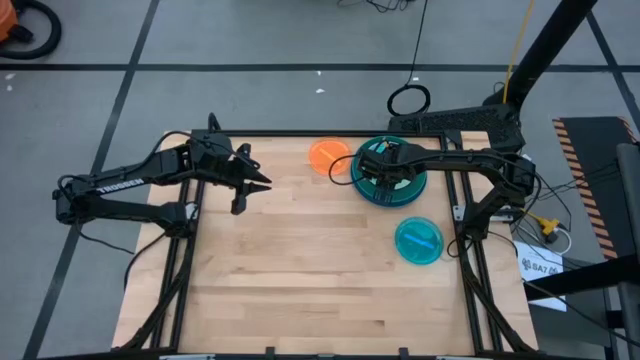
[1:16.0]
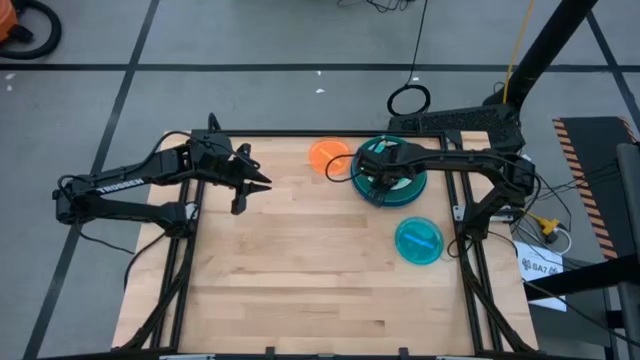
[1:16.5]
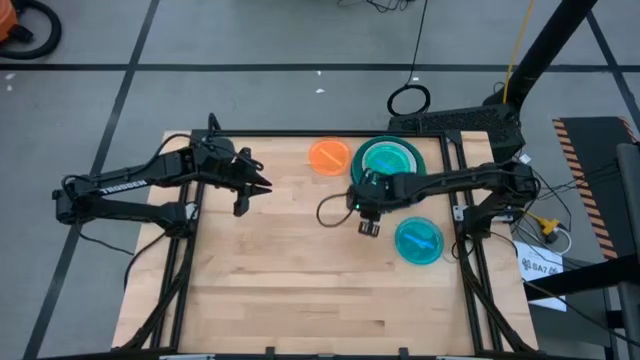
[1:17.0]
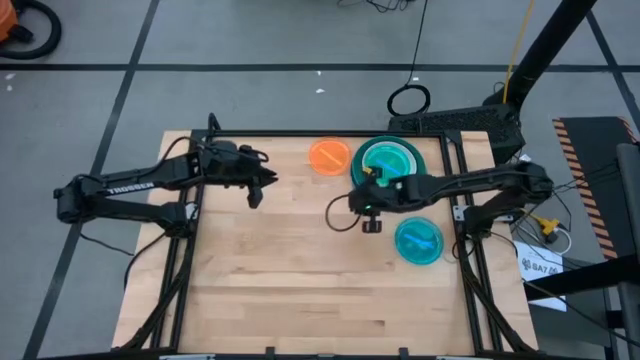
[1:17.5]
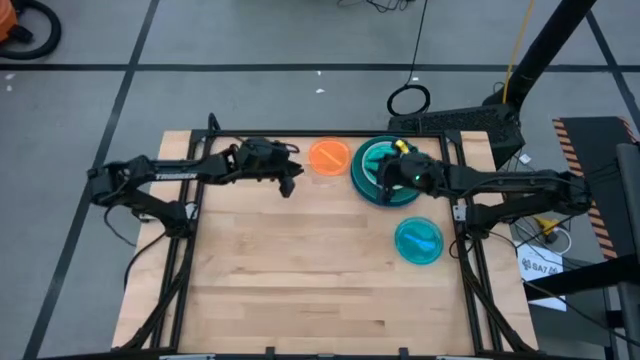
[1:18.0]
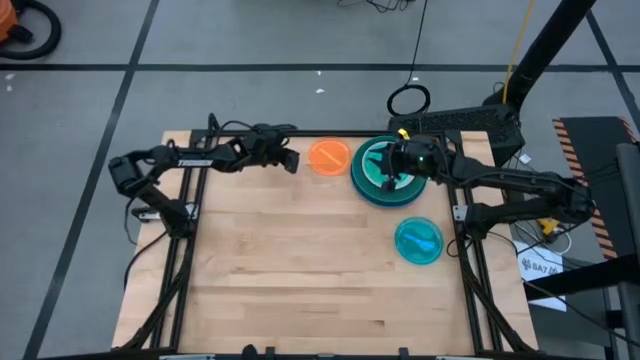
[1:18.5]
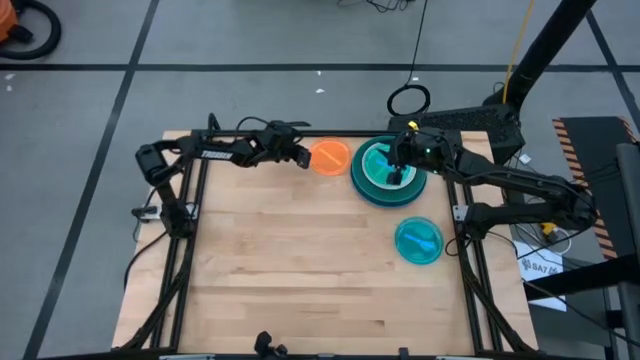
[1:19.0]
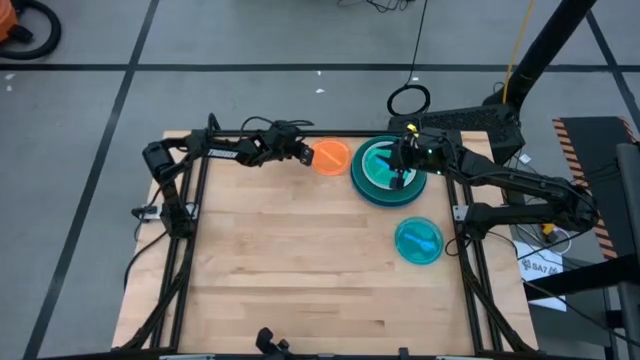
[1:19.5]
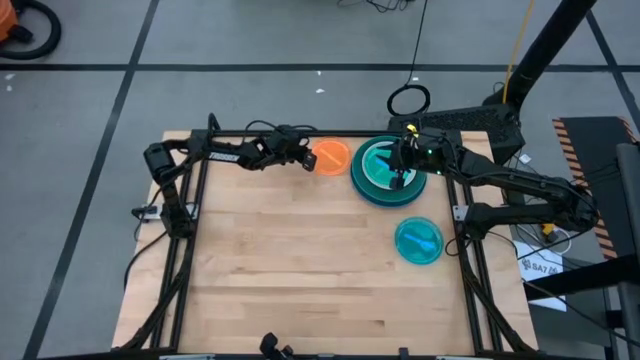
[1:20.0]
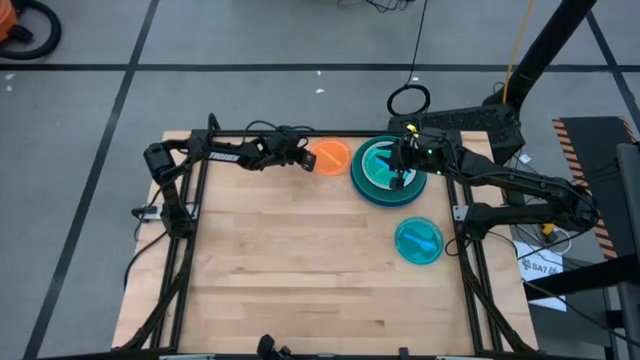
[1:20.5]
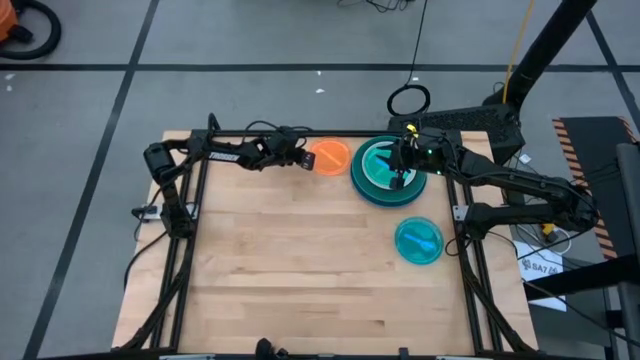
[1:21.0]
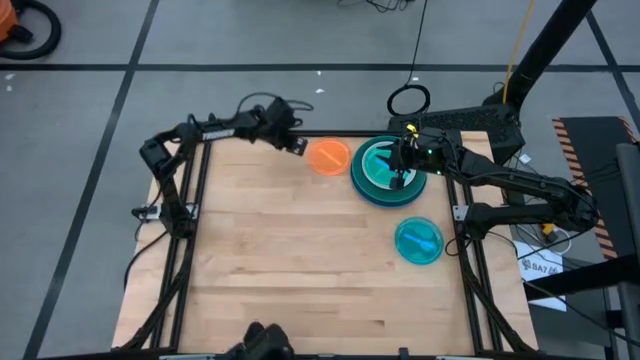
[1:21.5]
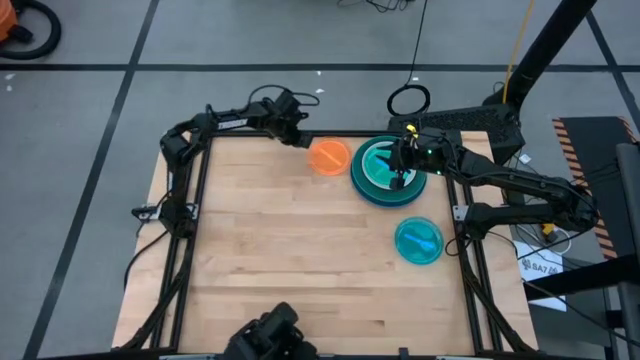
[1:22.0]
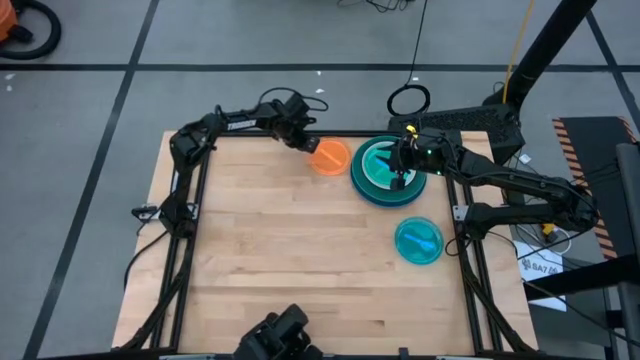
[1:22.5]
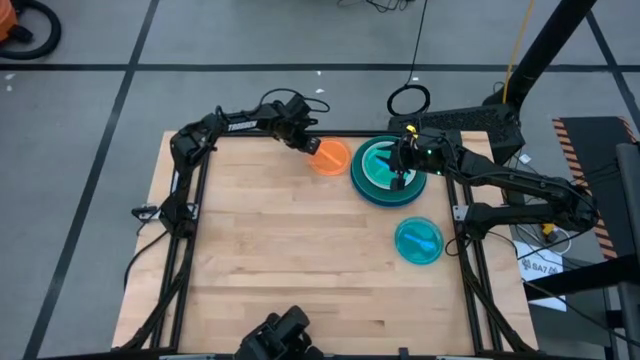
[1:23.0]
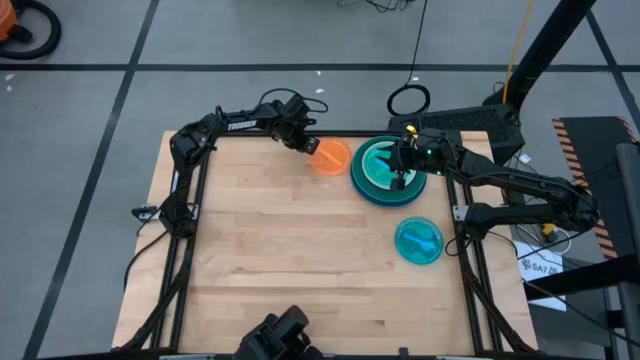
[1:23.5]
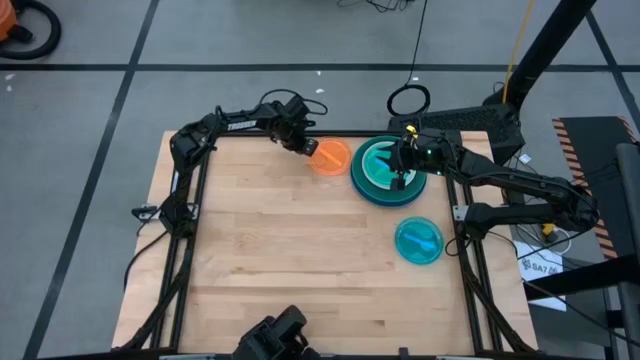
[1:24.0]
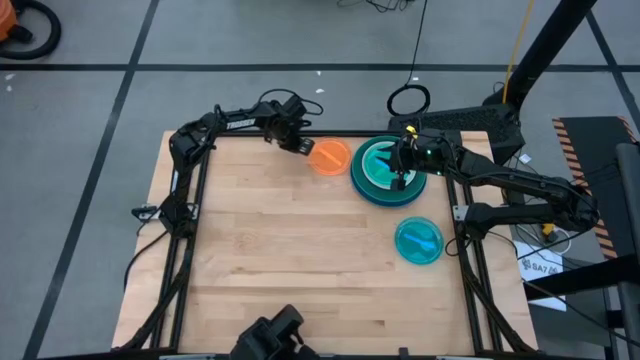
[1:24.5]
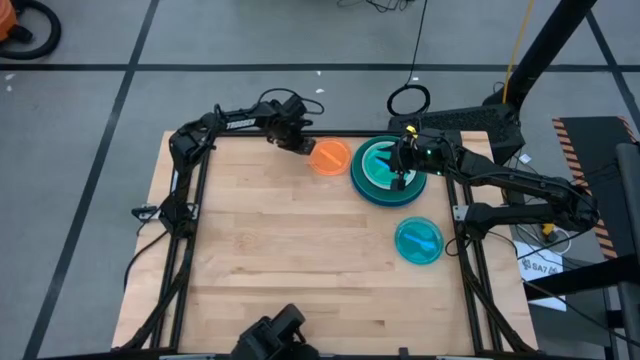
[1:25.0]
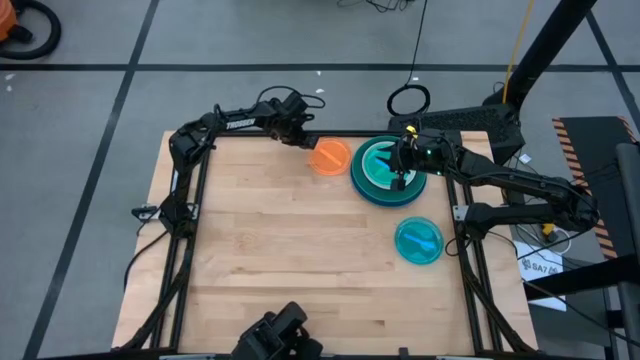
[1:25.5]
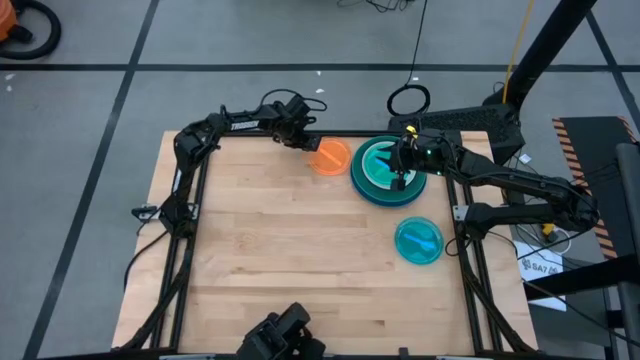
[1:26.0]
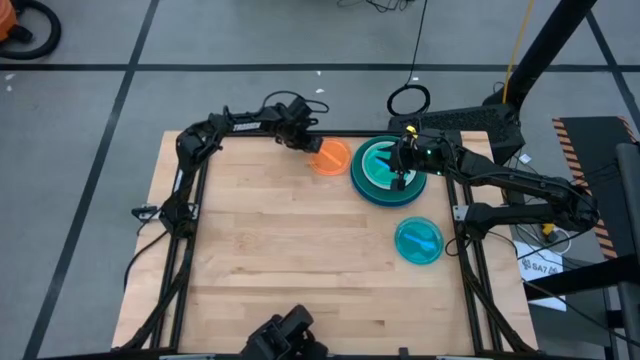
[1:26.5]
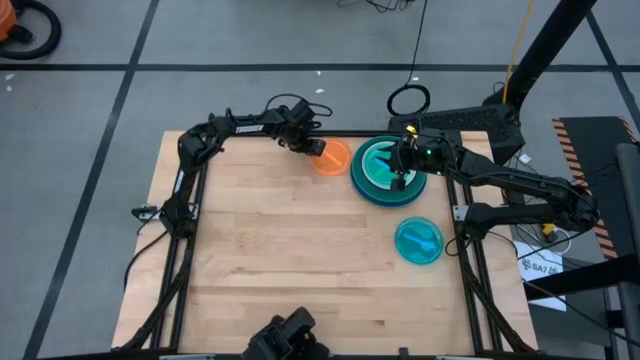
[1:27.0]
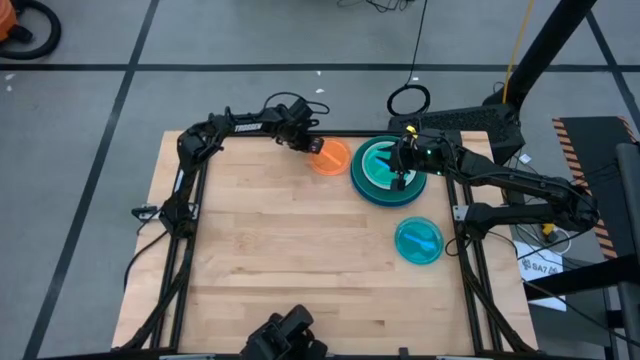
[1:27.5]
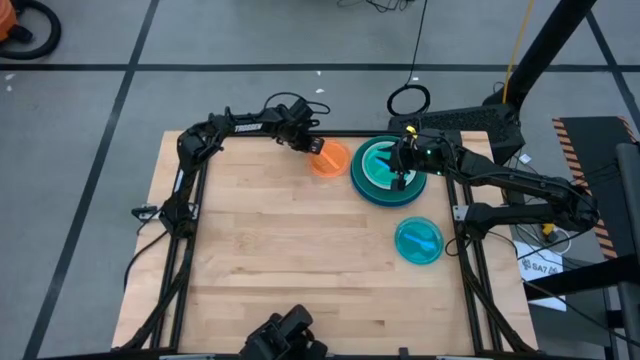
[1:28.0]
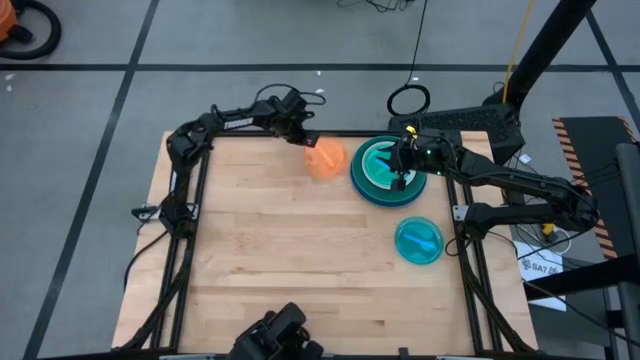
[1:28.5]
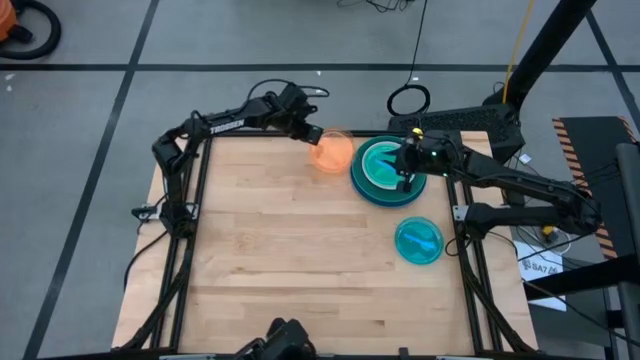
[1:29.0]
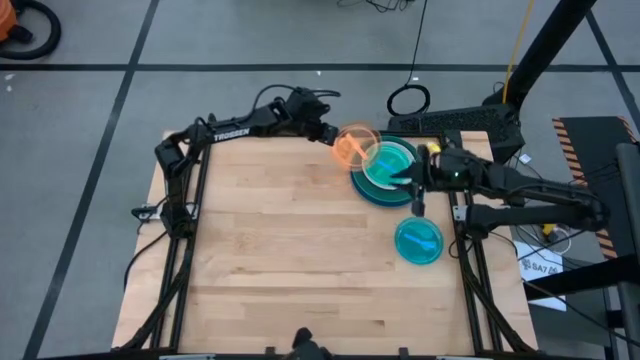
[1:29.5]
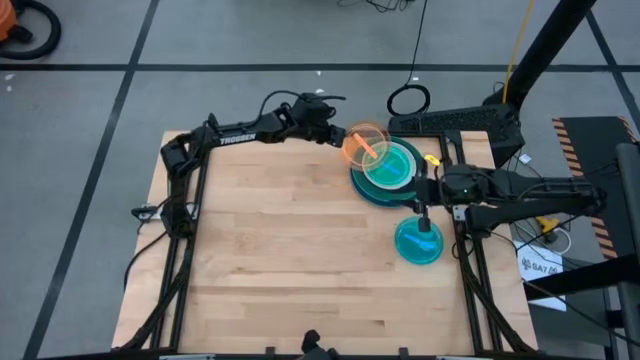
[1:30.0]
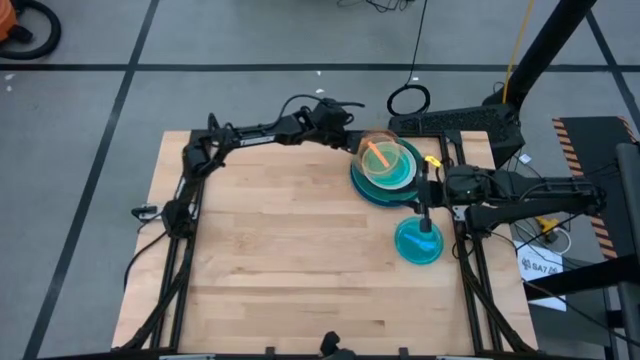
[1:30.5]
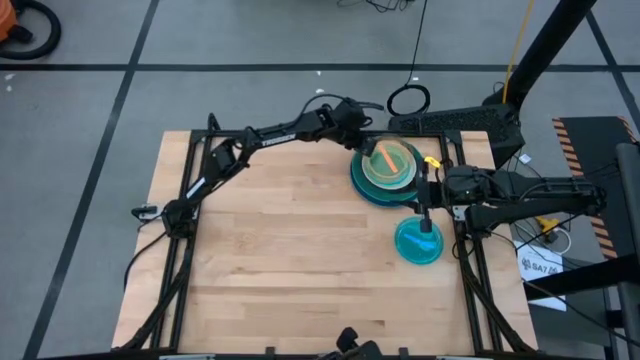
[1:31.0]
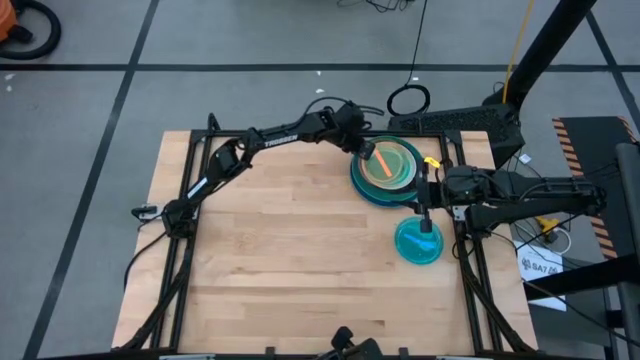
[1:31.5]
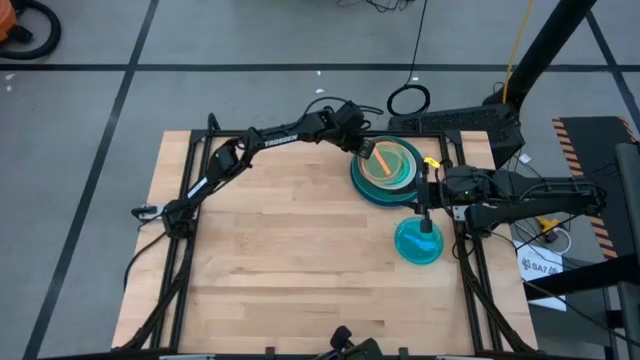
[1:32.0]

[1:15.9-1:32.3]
Task: Stack plastic plates
Stack the orange plate on top of the light blue plate

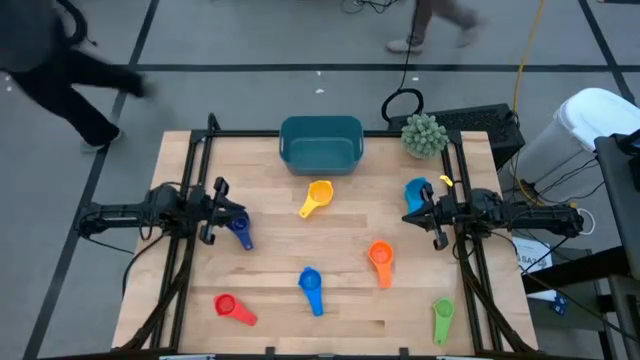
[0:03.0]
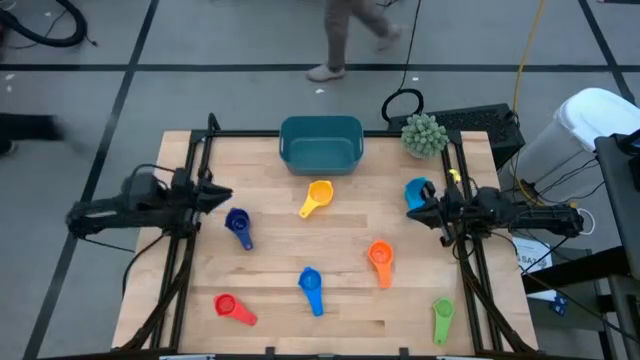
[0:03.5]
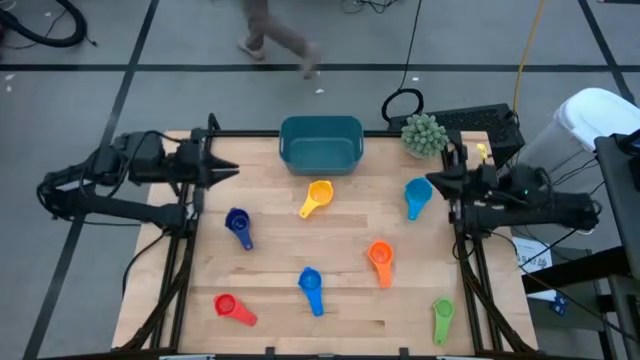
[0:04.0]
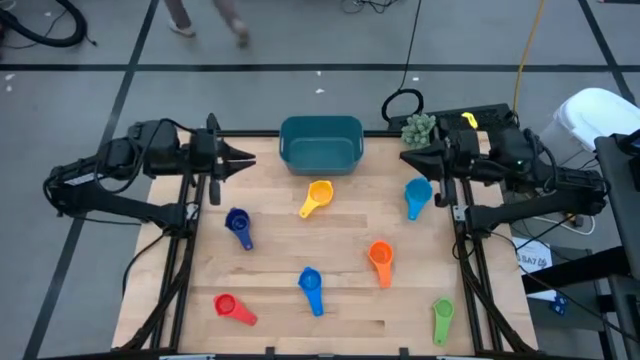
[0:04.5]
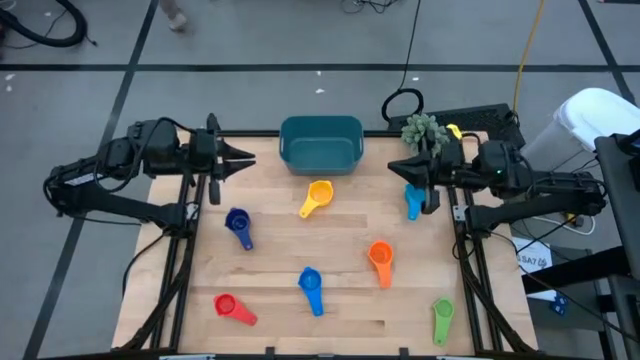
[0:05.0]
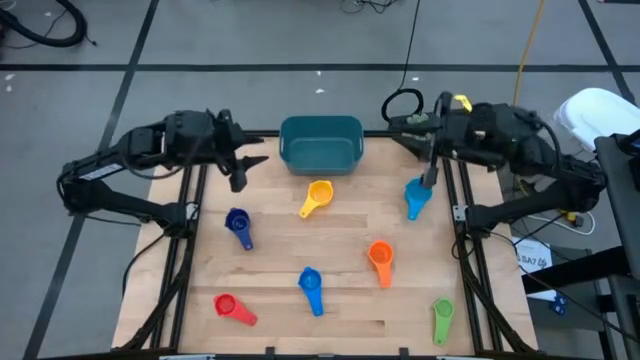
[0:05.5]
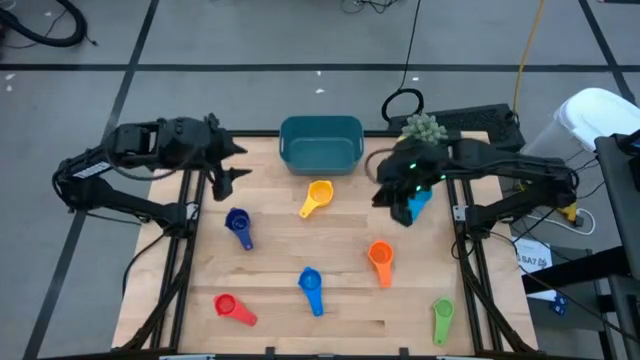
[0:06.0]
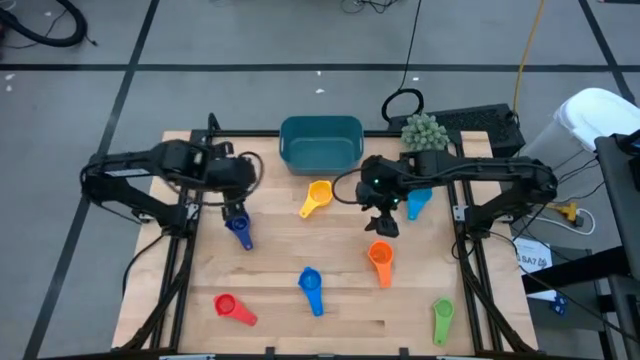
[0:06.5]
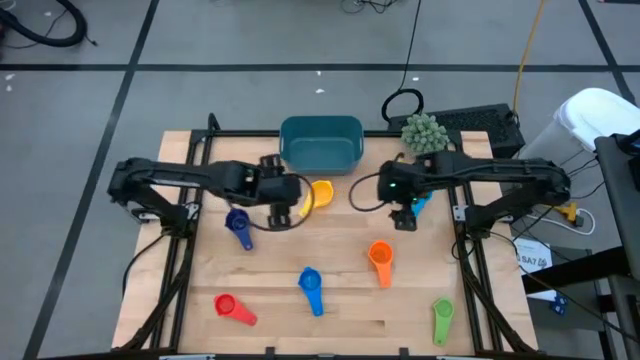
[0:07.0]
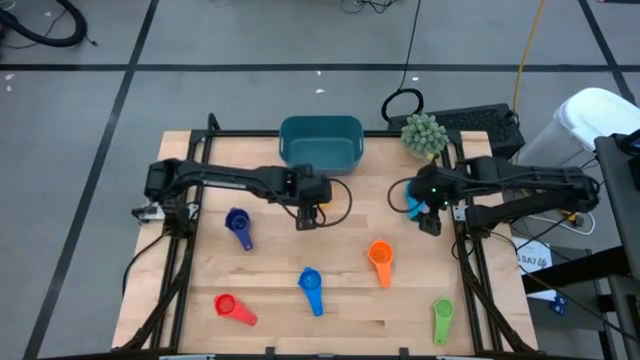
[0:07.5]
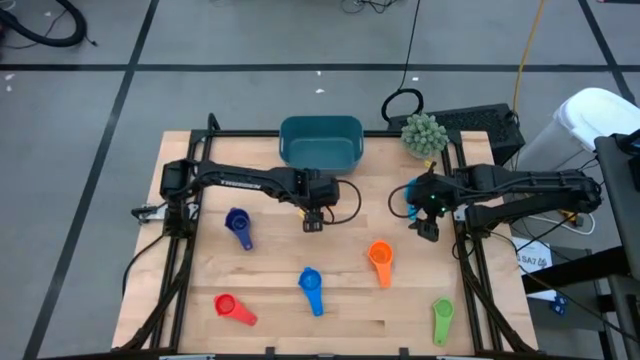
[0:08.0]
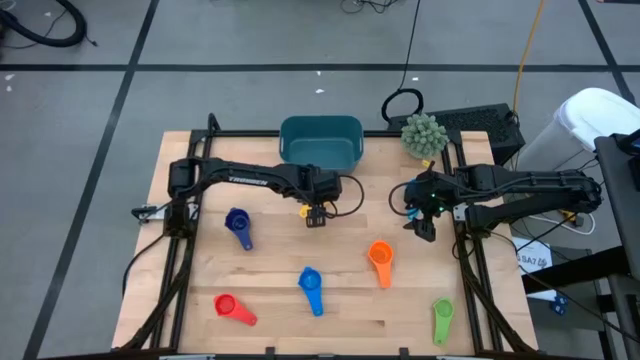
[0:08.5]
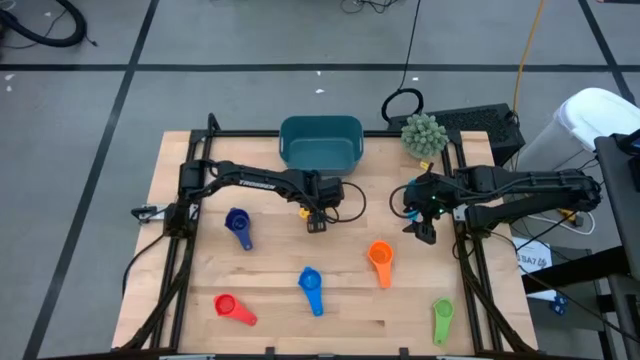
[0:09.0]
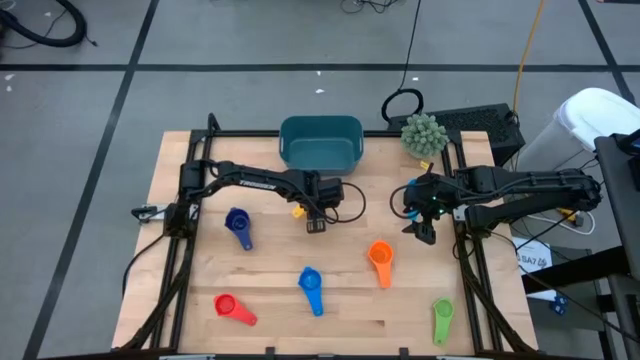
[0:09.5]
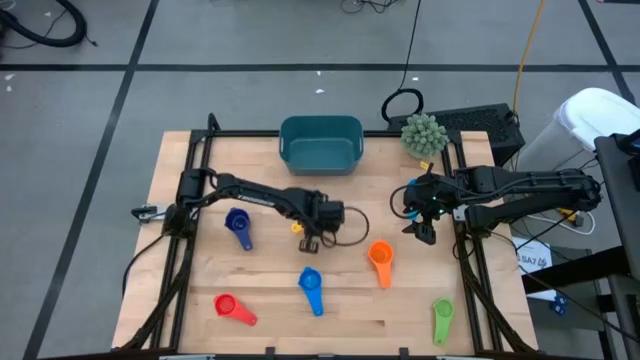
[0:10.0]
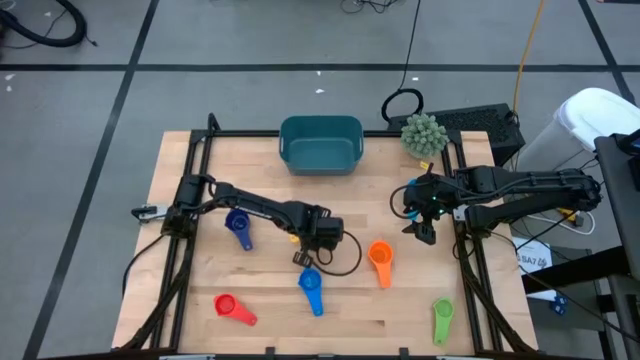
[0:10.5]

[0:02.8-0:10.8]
Task: Nest measuring cups in basket
Move the yellow measuring cup to the center of the table
